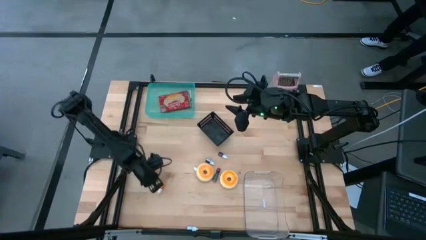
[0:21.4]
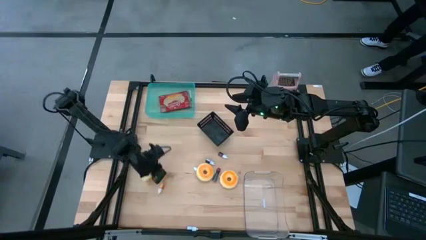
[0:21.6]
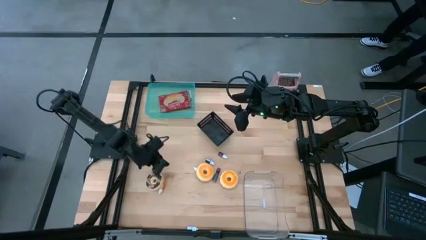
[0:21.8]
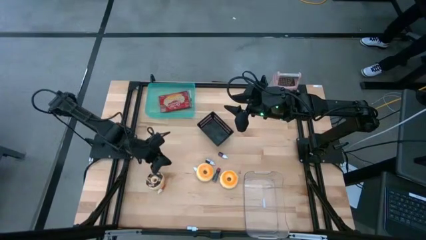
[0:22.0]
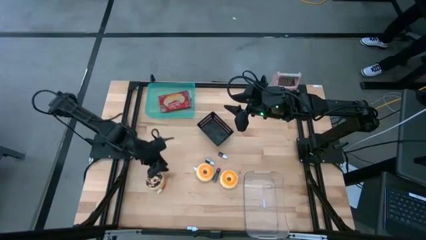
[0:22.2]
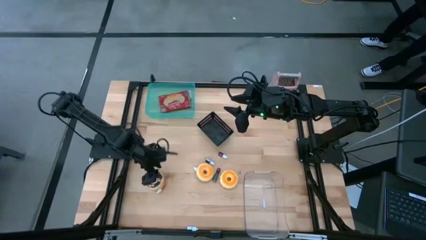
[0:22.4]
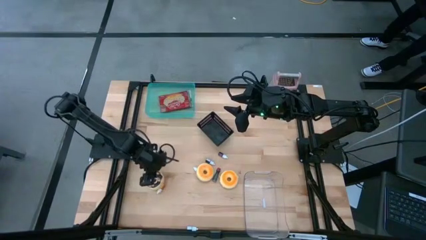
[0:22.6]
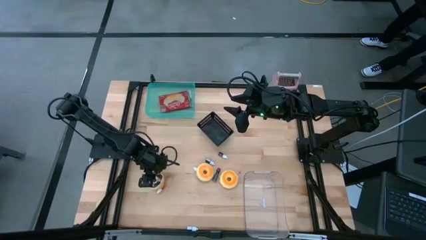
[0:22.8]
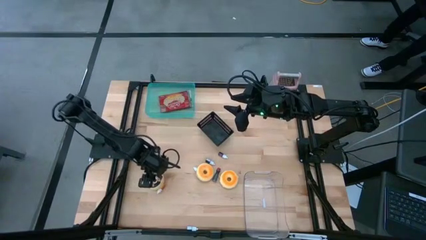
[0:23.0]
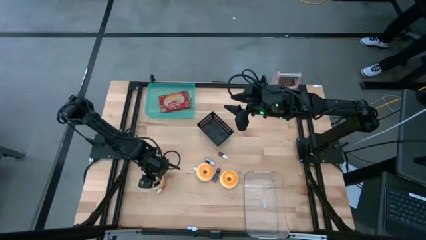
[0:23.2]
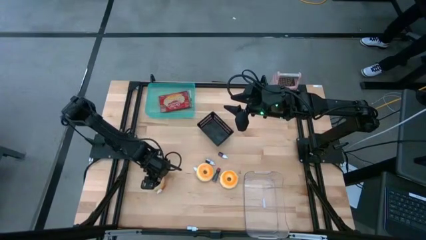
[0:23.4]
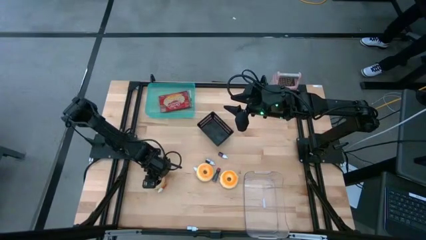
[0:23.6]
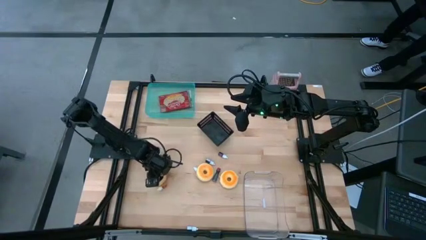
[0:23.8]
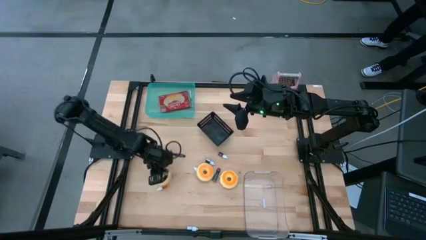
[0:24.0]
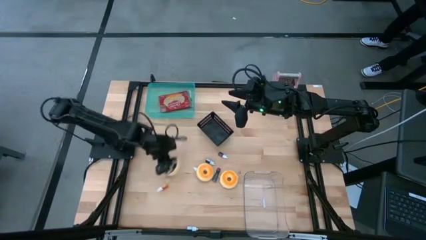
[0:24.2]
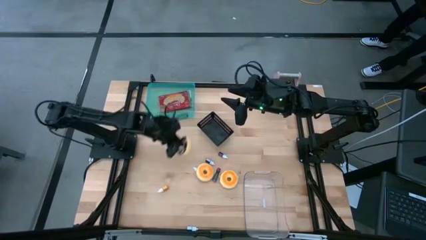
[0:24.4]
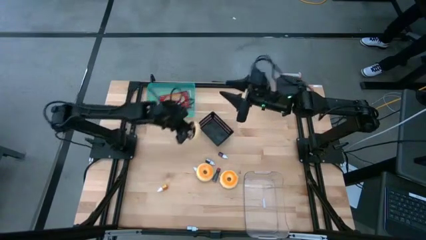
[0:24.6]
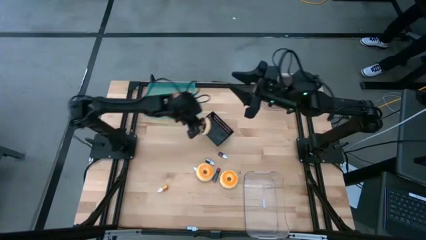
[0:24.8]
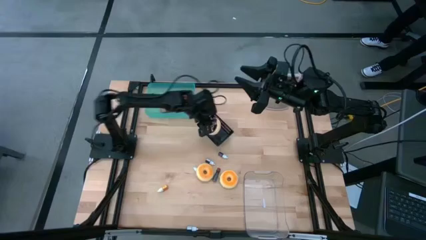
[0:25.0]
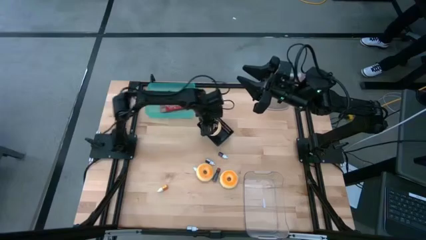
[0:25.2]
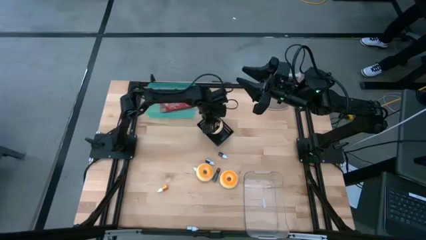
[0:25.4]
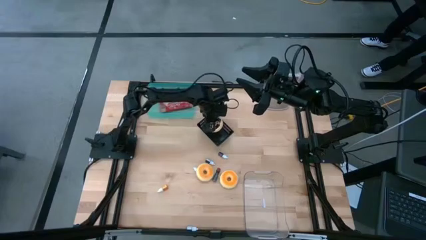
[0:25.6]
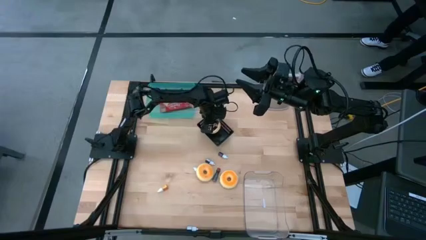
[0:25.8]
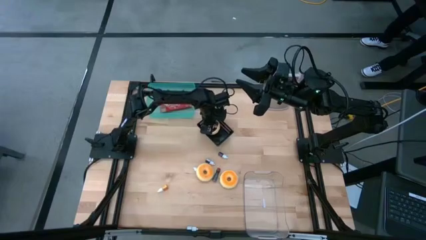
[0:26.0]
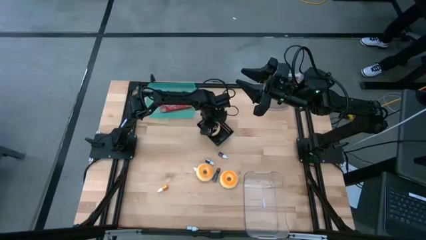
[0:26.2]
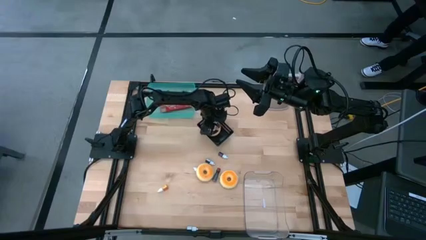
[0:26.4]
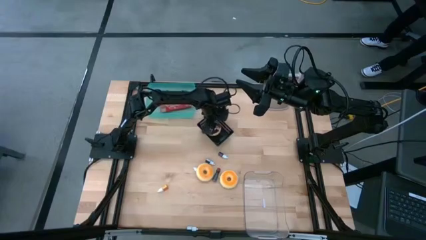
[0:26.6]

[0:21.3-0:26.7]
Put the black donut into the black bin

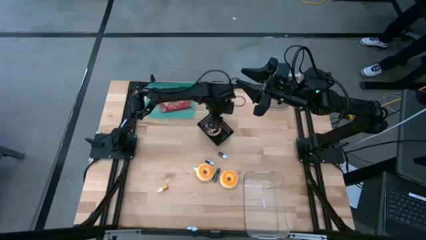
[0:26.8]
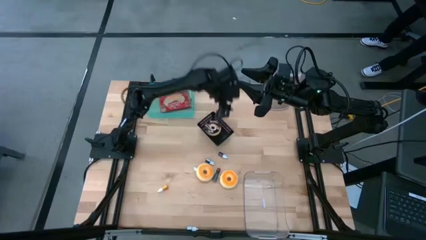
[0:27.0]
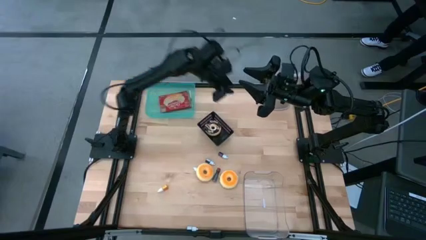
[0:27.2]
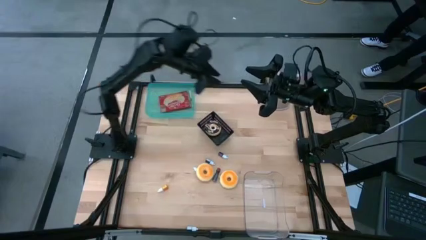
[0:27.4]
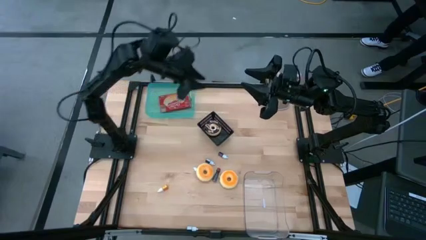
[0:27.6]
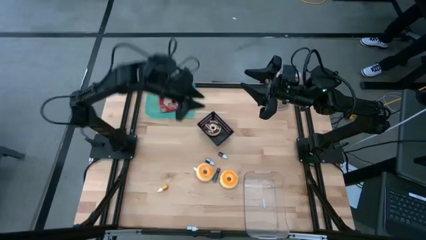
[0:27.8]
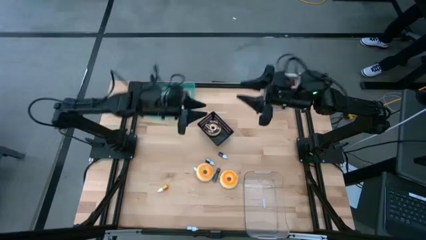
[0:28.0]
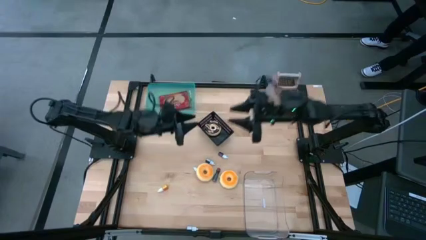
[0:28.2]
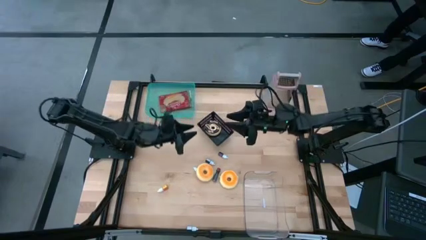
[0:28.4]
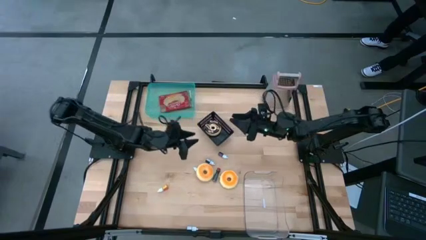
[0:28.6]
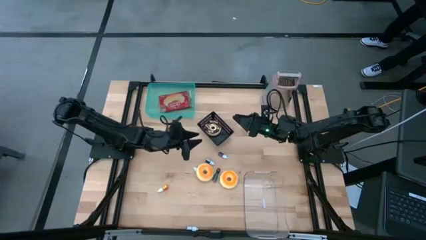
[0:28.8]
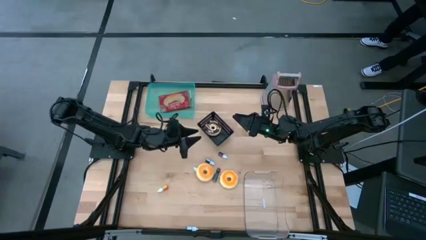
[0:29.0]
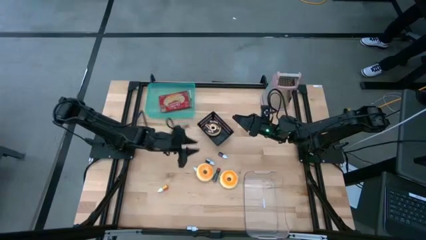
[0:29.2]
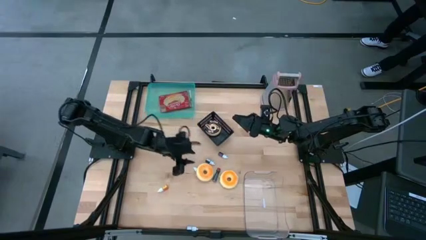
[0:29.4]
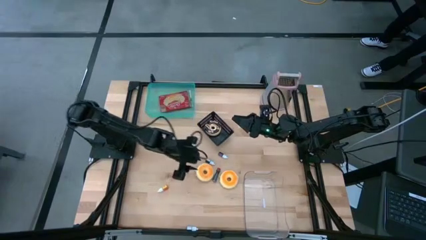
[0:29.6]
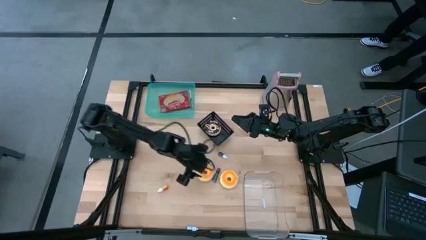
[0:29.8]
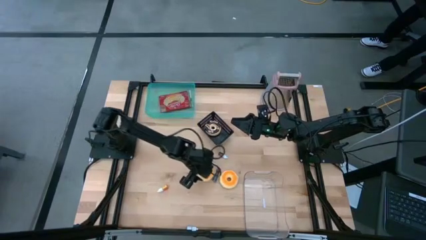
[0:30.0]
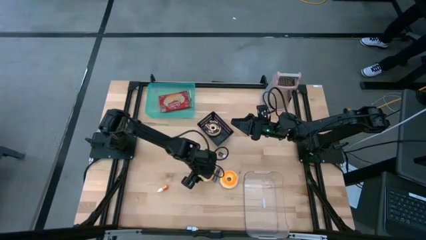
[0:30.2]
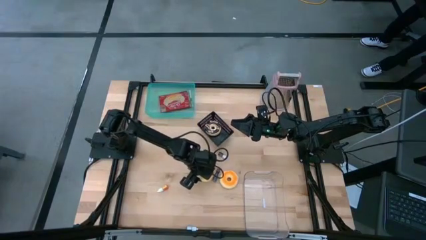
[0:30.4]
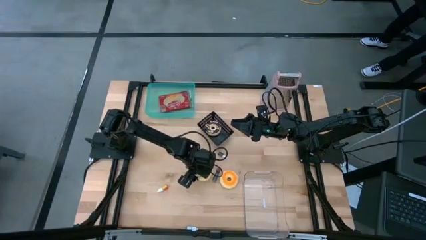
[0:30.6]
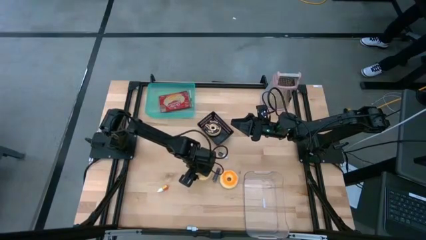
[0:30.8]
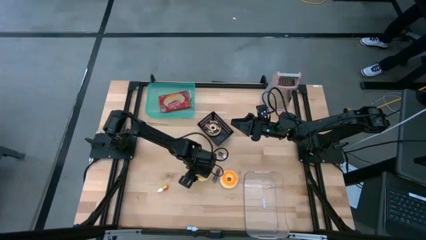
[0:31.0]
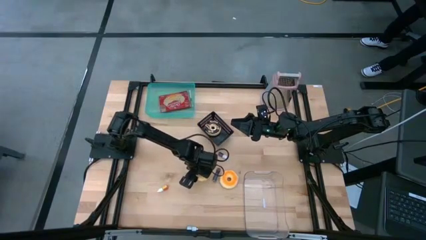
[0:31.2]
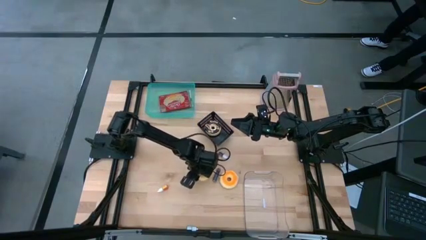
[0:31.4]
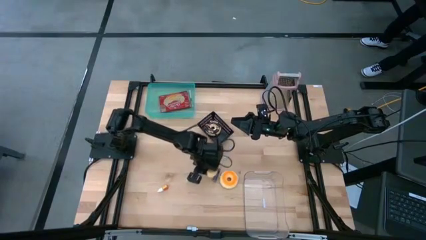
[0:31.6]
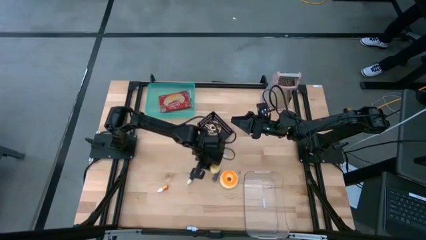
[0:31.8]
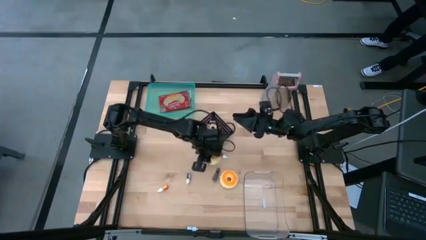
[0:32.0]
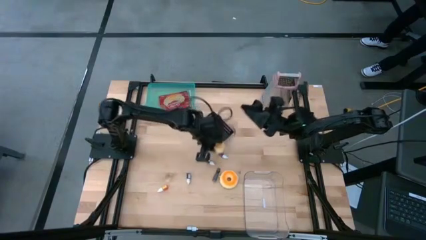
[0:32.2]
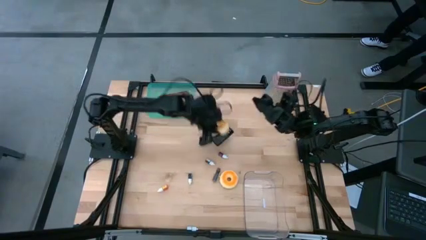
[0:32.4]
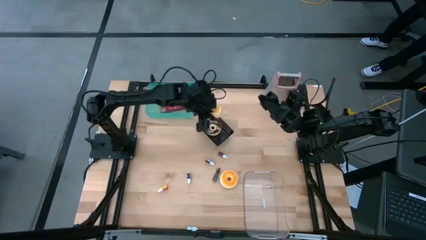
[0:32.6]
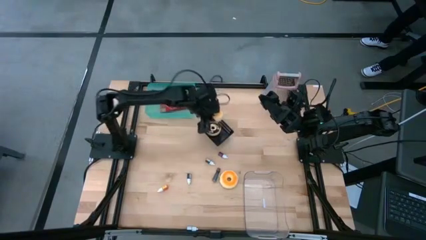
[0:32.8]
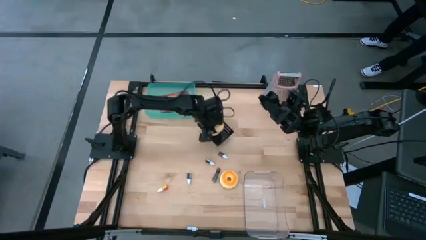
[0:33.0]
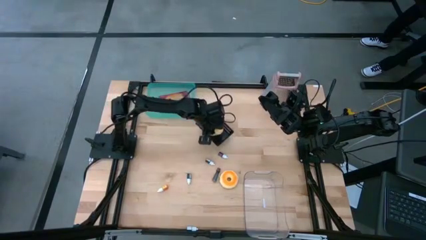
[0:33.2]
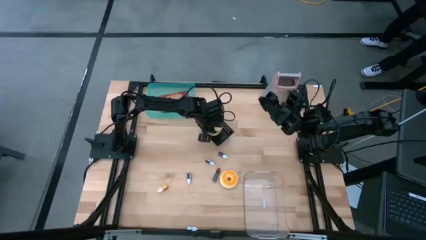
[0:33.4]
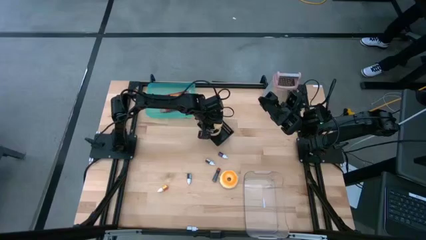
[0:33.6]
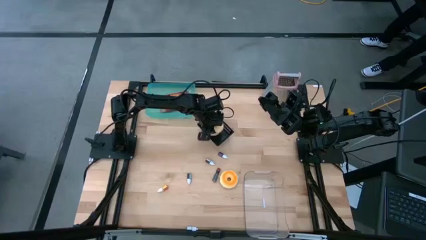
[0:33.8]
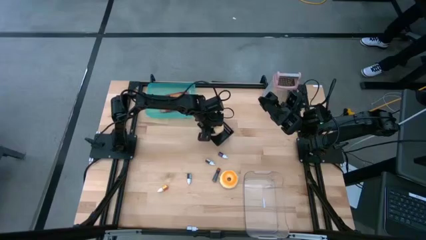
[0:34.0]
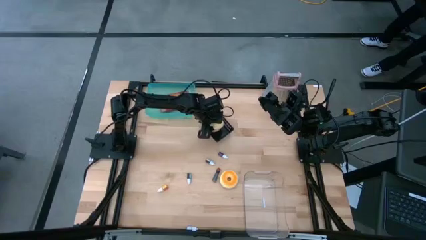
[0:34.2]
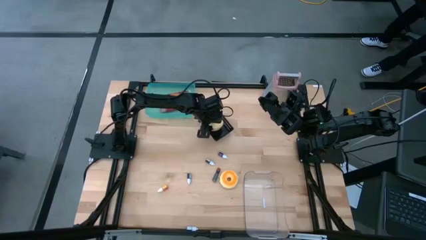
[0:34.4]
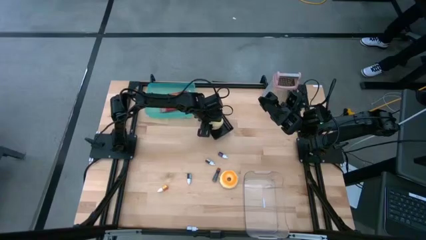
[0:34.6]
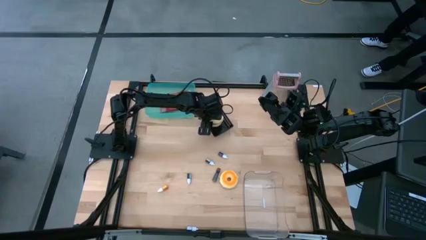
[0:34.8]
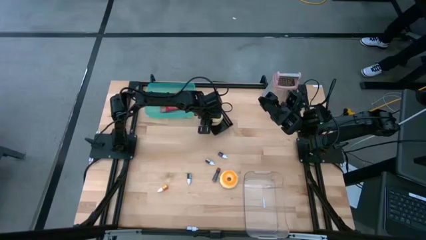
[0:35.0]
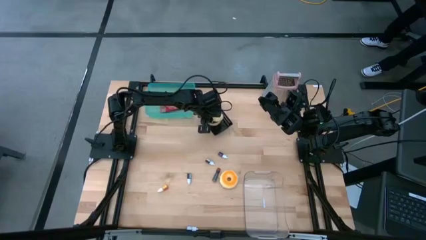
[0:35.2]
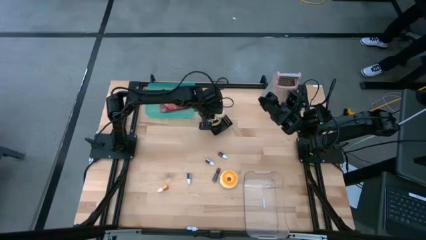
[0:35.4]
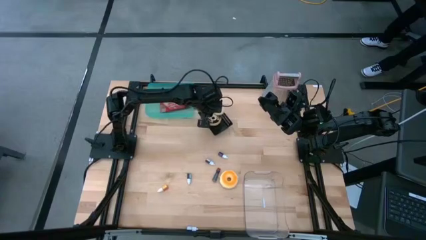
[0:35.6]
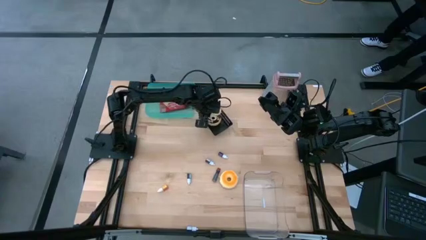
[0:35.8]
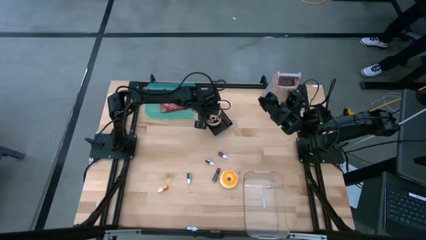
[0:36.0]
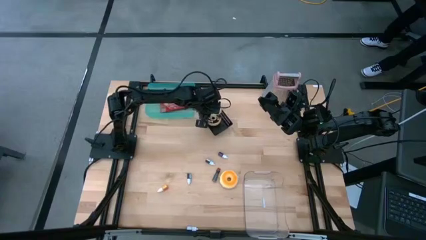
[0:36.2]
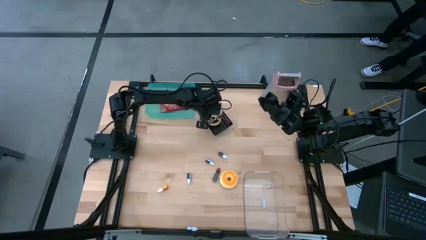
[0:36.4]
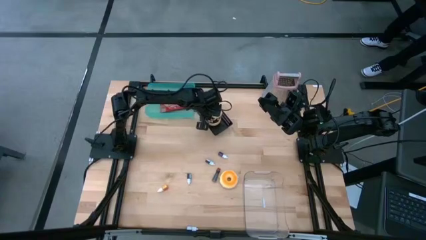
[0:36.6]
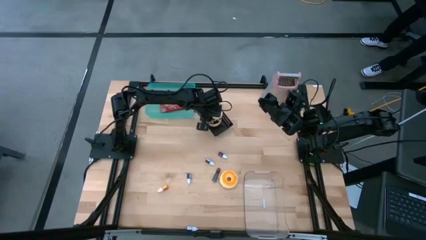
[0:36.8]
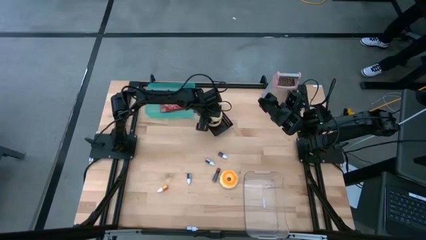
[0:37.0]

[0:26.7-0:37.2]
Put the pink donut into the black bin
